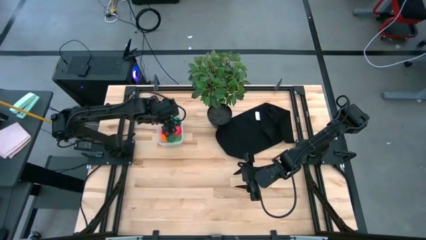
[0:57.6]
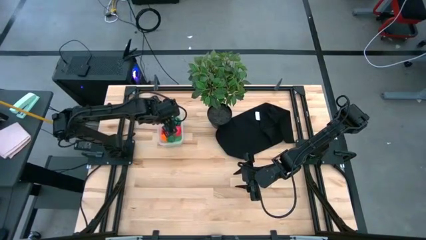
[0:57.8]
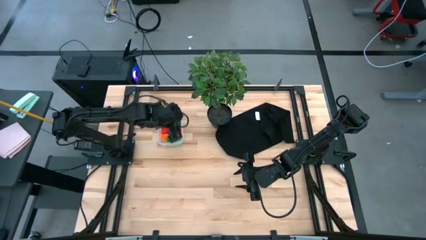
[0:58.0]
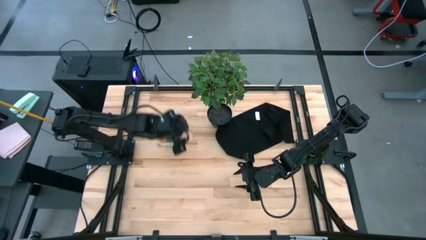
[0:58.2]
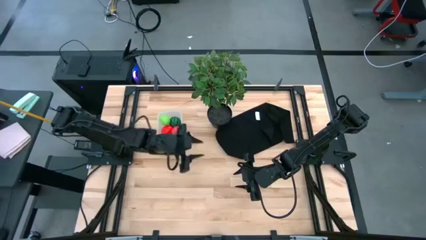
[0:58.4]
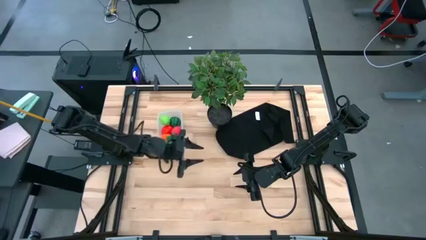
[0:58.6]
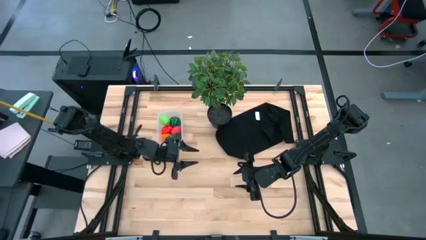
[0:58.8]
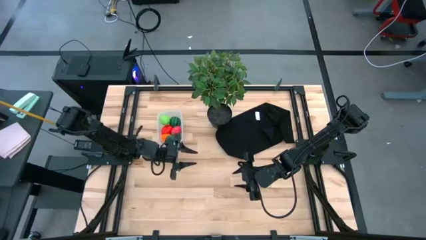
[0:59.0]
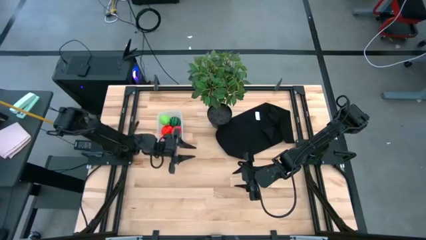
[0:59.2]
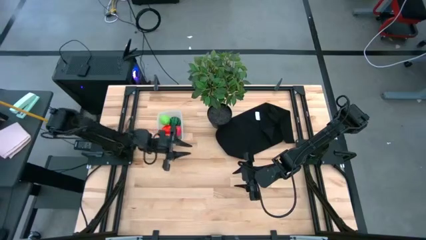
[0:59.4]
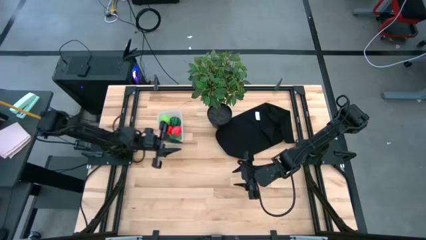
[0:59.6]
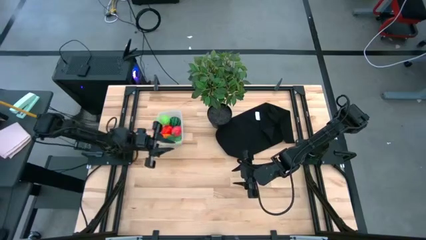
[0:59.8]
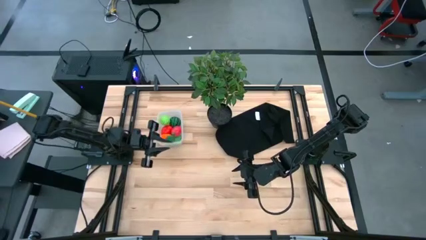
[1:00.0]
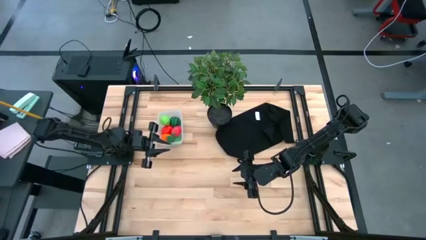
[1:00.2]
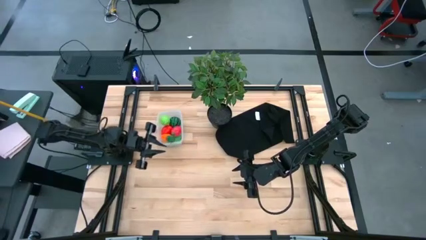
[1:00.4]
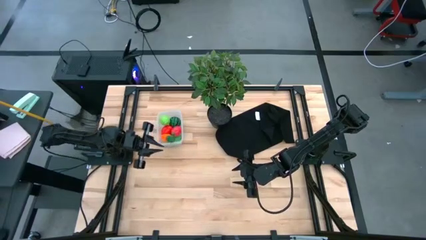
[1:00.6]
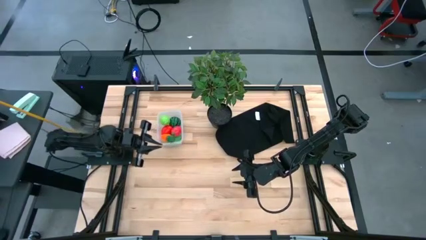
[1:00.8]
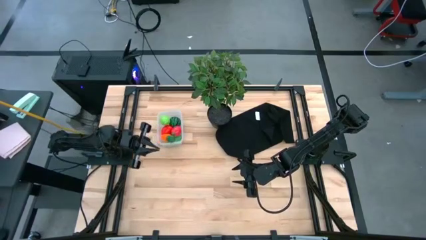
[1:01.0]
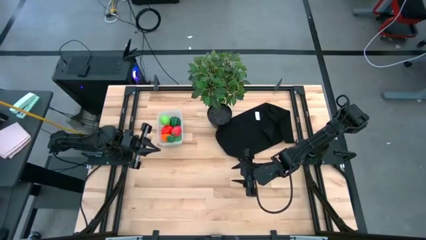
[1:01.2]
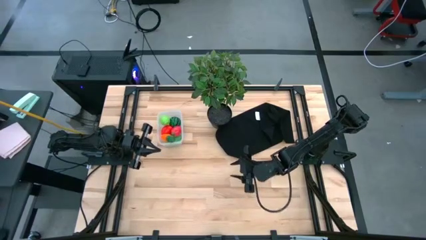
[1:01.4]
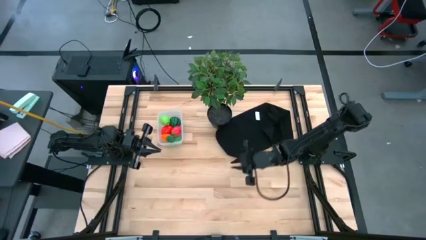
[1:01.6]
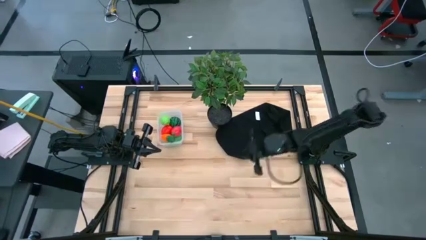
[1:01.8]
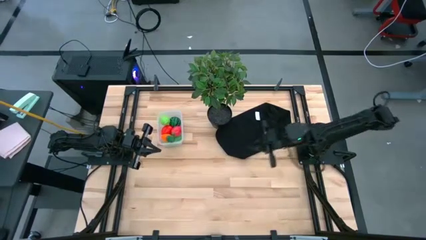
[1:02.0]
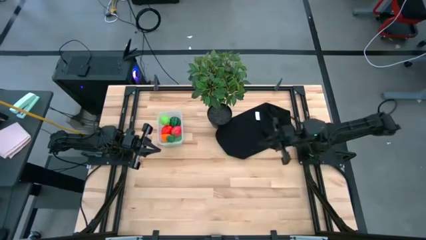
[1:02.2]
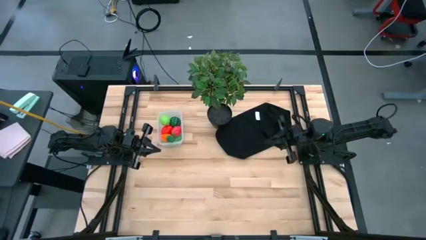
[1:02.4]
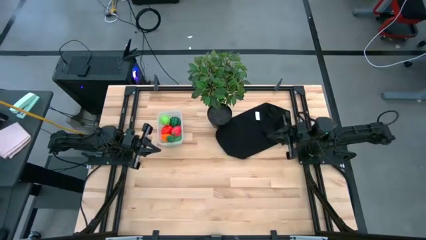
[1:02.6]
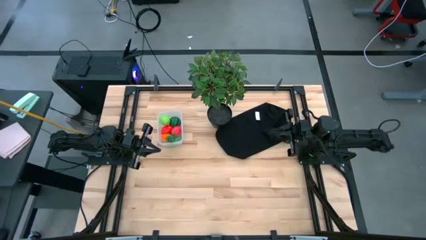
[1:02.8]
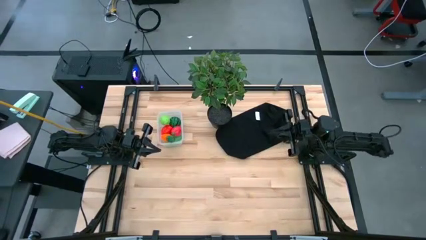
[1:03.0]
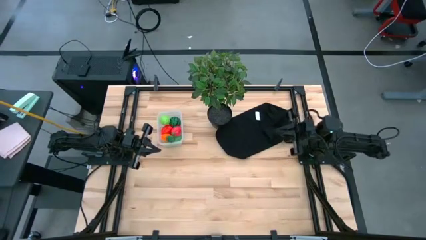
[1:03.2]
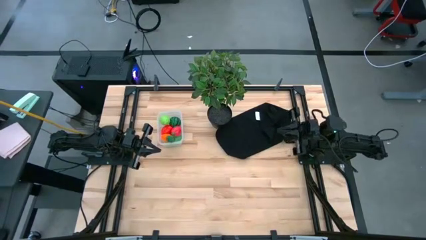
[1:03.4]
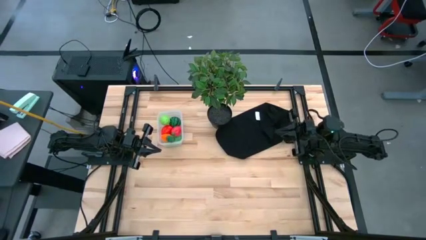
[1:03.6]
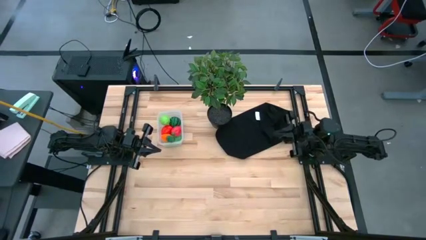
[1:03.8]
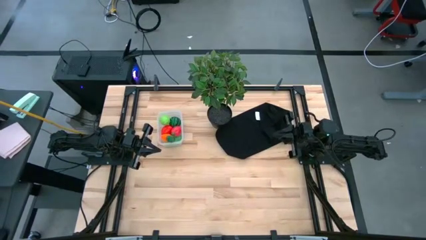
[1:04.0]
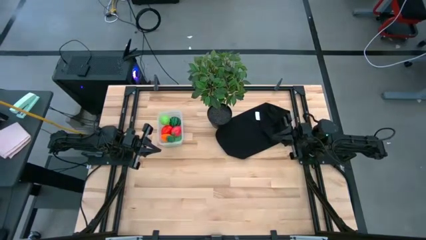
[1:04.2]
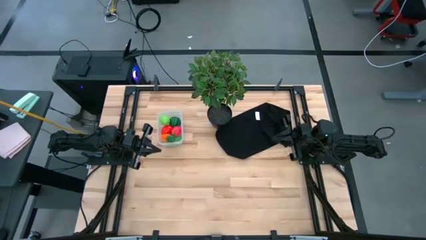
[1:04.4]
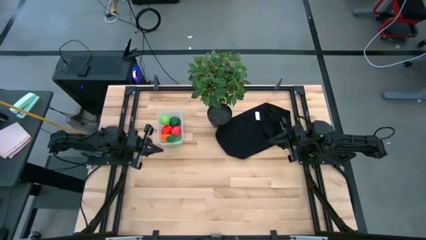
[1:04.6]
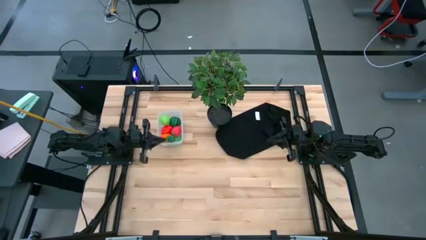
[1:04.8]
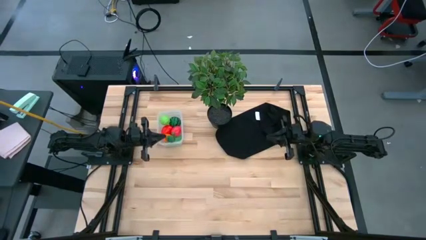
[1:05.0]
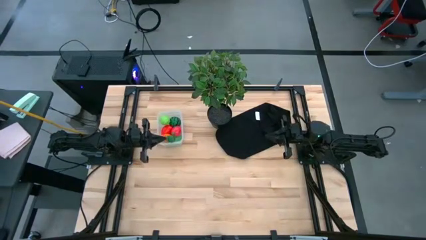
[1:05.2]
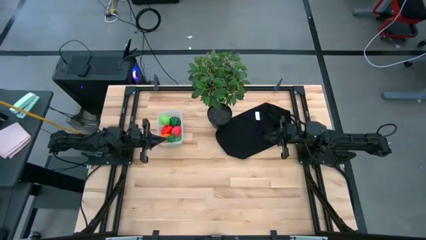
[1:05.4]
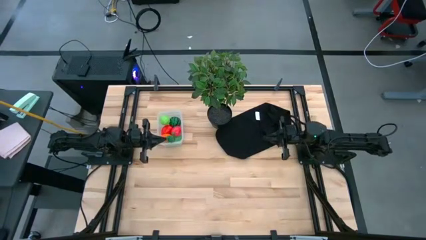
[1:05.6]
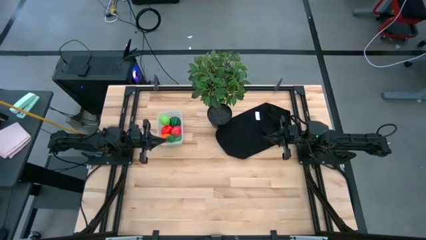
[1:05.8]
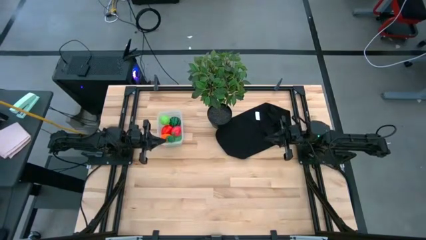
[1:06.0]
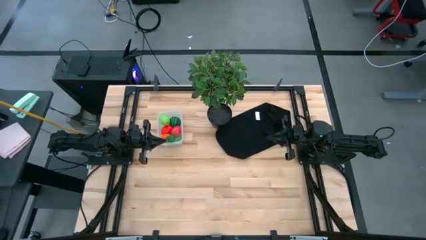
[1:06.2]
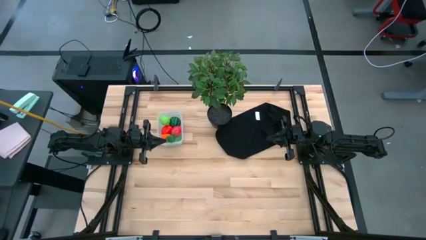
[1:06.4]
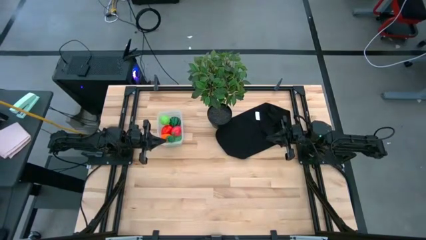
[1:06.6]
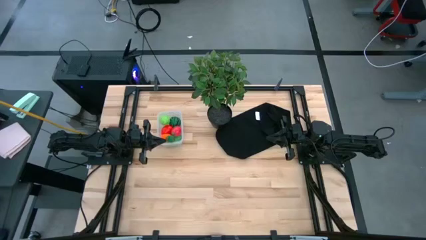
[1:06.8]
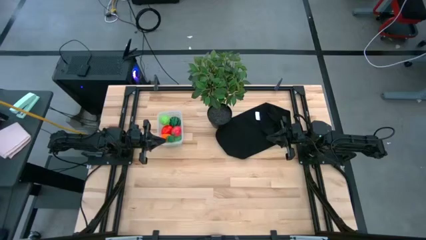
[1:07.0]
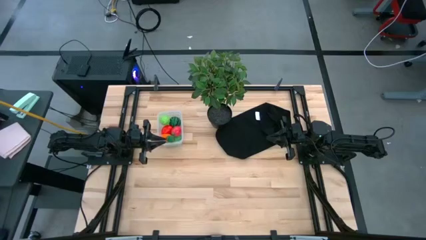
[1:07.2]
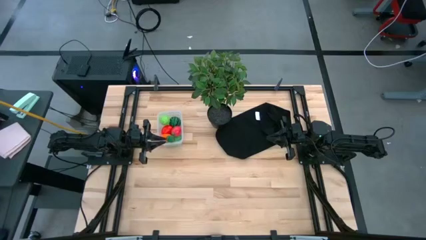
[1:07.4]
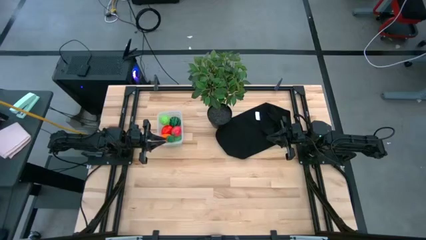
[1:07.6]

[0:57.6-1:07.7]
Task: Pick and placing Produce into tupperware
Return to Home Position

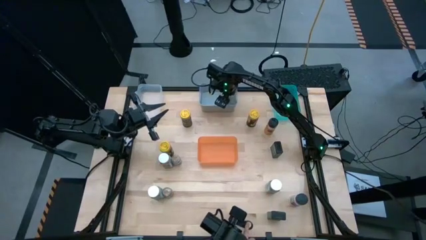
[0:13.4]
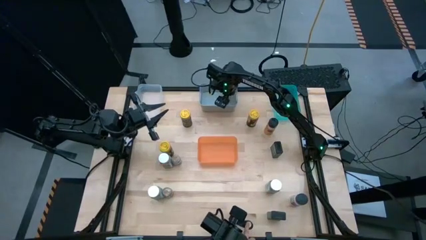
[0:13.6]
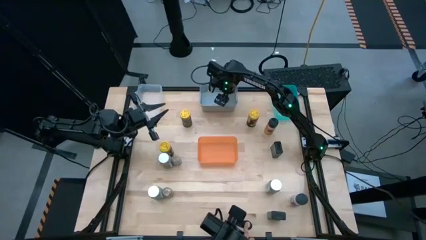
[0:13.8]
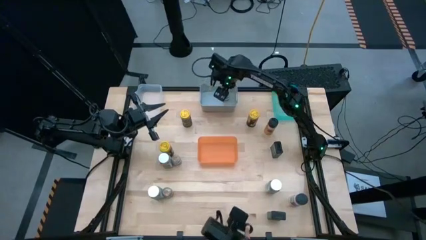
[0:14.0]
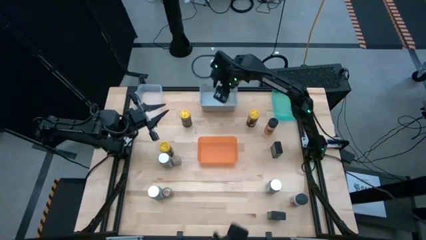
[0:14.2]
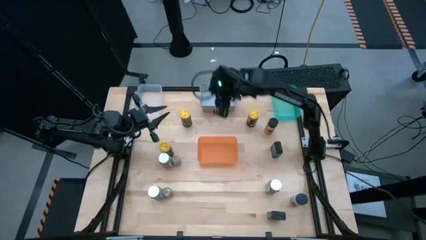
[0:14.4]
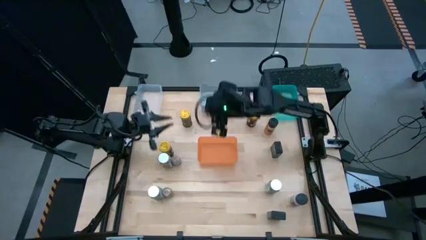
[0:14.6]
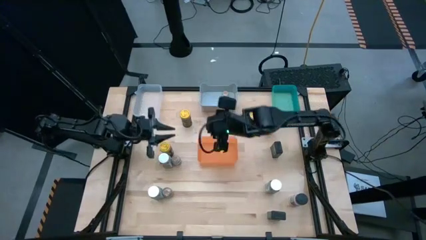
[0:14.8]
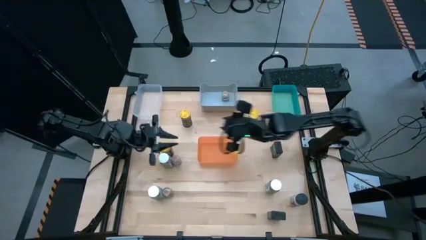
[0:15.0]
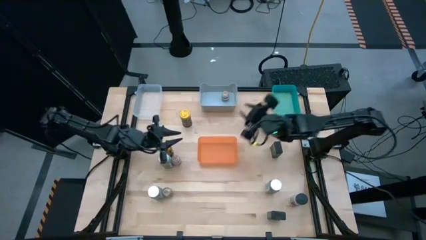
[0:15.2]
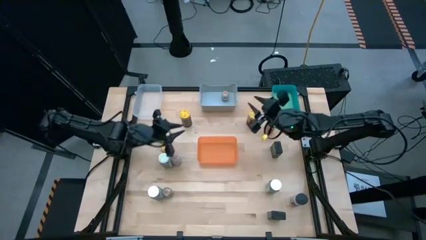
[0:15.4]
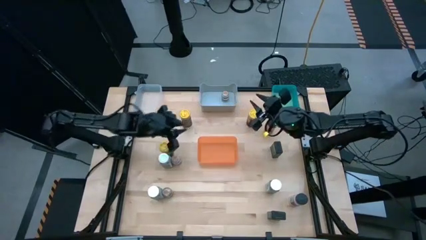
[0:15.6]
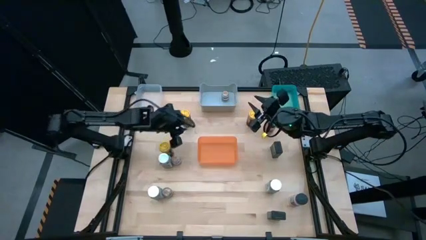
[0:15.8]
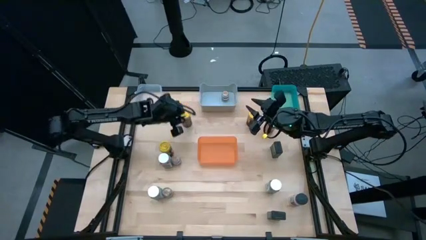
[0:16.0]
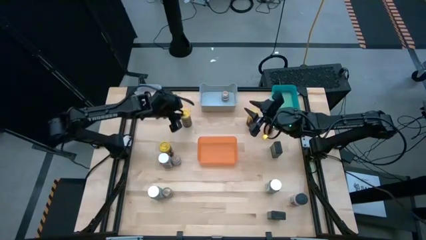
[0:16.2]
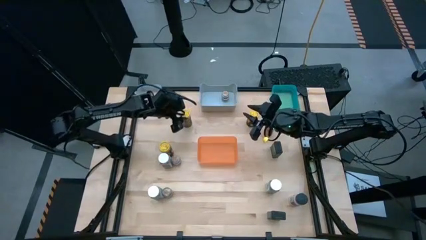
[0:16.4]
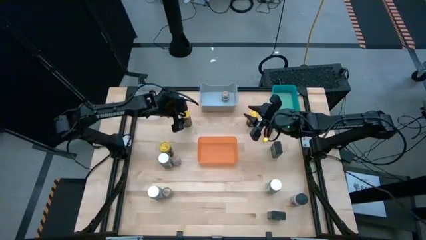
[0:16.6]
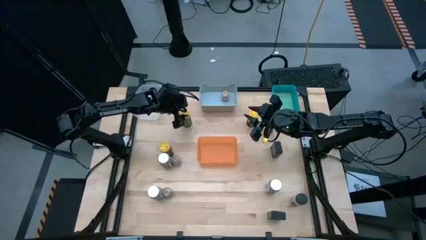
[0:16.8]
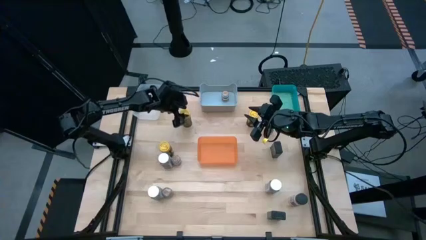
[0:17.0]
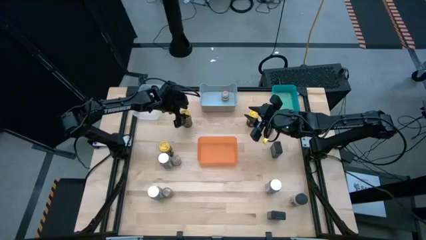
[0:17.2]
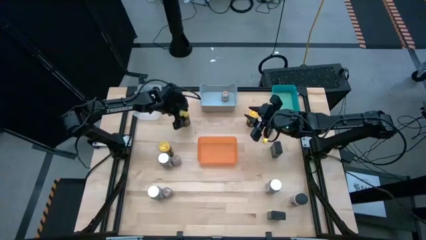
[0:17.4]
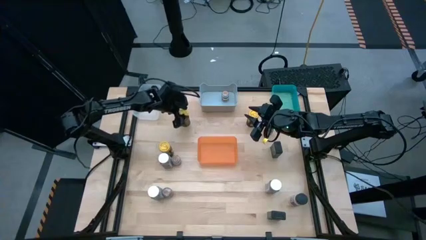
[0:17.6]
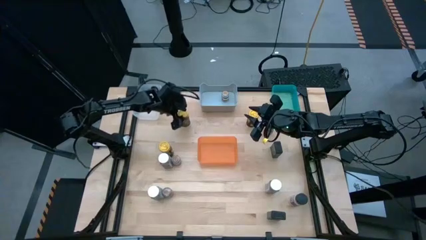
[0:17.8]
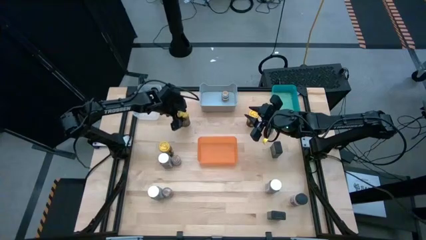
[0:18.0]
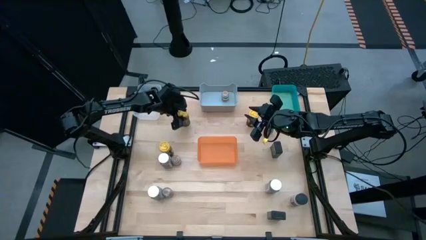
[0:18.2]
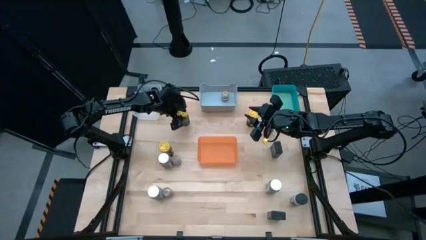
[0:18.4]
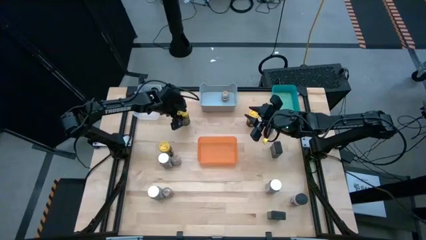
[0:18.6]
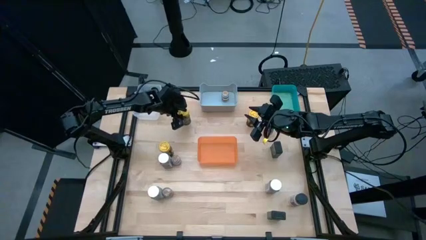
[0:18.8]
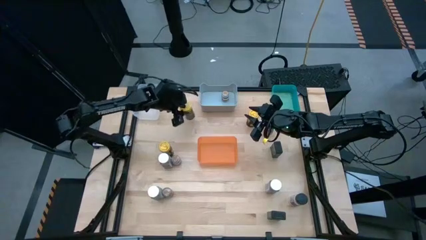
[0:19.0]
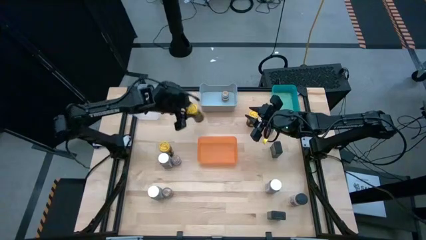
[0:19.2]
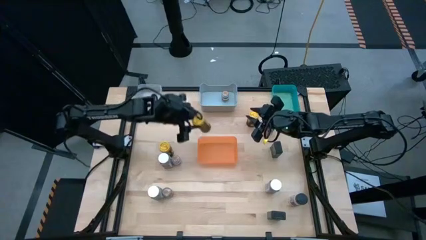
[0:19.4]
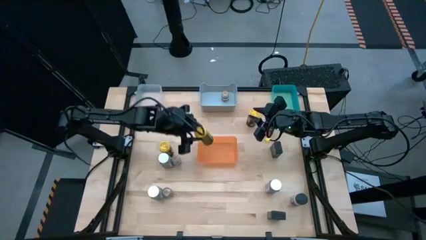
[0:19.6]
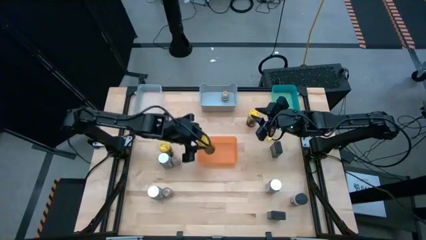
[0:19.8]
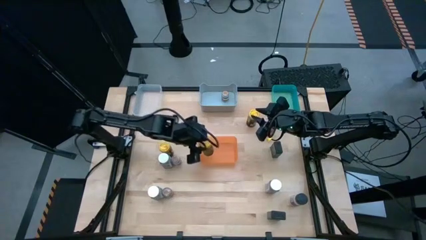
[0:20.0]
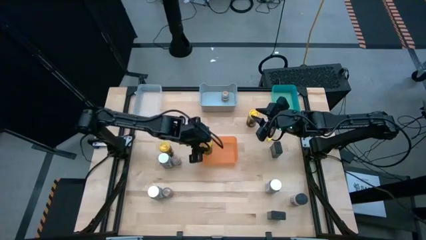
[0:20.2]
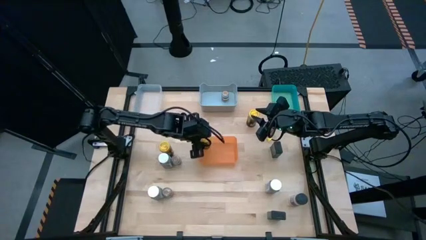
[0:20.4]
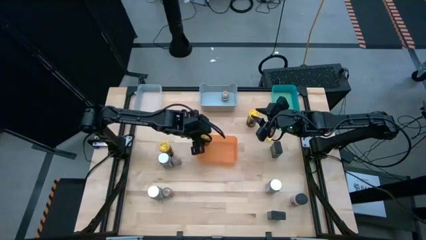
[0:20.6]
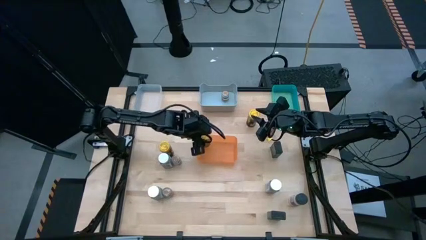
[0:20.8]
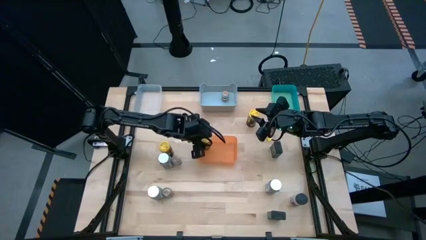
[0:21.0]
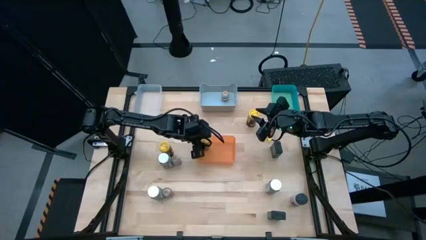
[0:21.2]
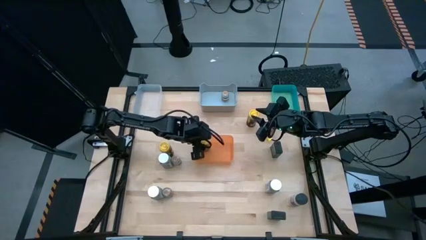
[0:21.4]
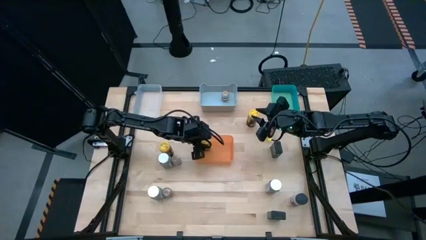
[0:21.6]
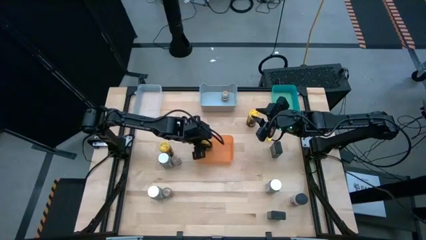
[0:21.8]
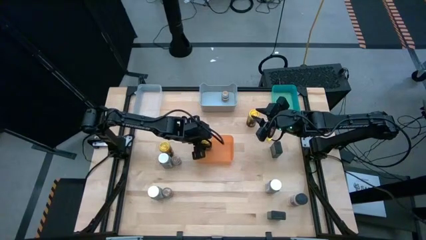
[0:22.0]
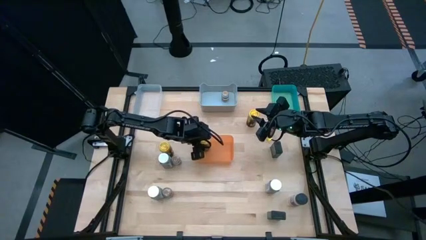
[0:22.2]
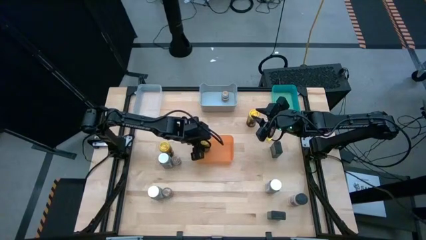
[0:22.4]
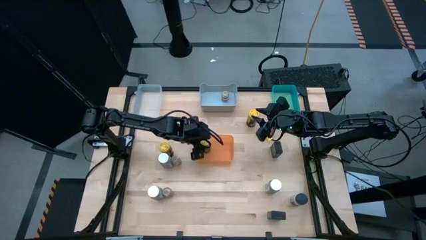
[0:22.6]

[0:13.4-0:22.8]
Task: Sort spices by type
Put the top left yellow seasoning bottle into the orange bin
